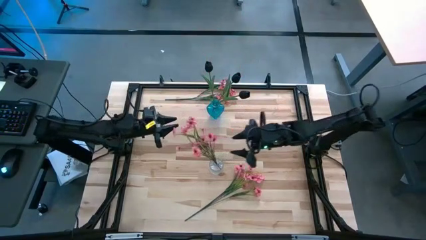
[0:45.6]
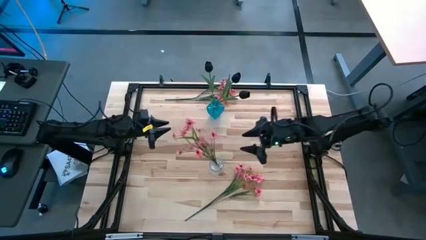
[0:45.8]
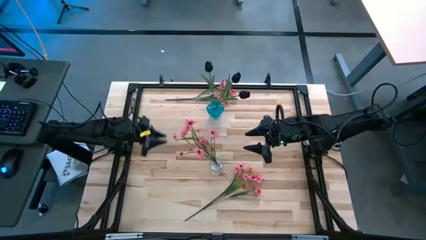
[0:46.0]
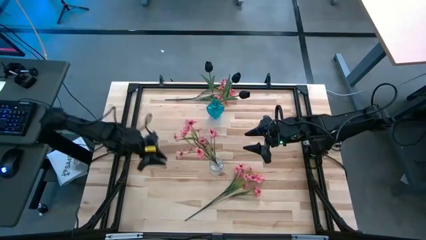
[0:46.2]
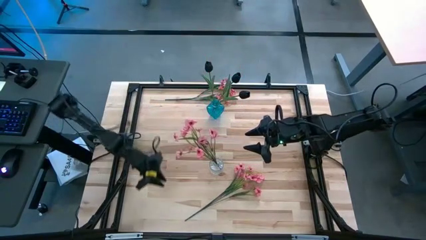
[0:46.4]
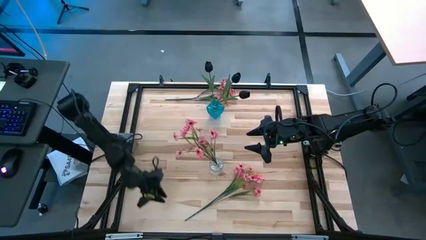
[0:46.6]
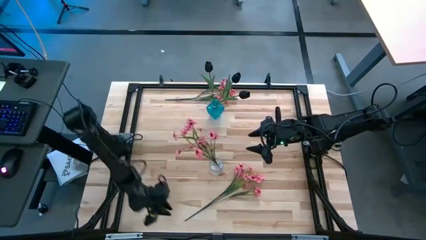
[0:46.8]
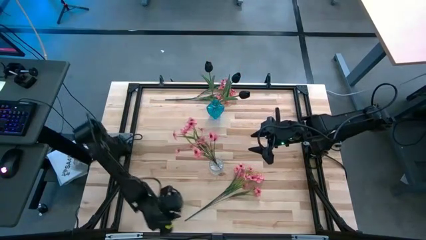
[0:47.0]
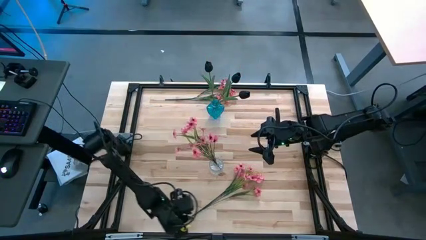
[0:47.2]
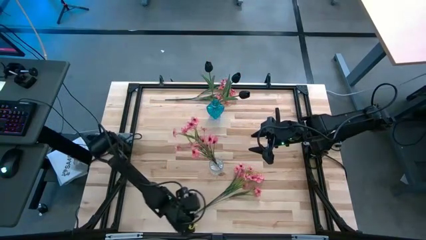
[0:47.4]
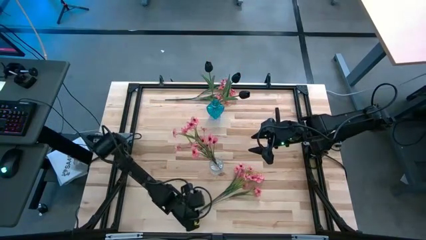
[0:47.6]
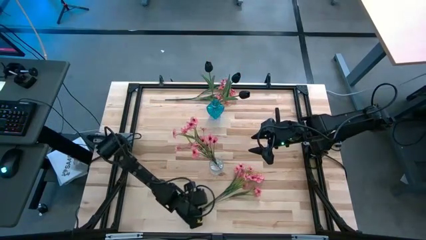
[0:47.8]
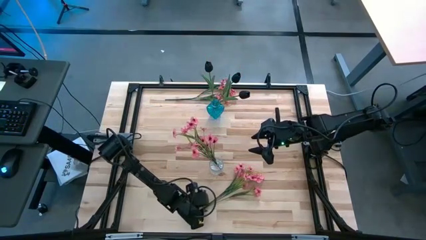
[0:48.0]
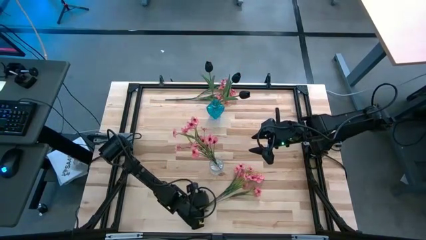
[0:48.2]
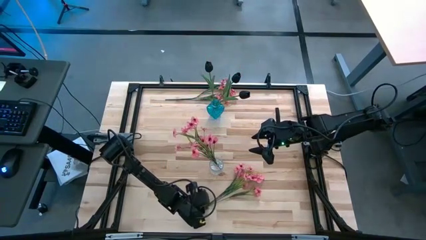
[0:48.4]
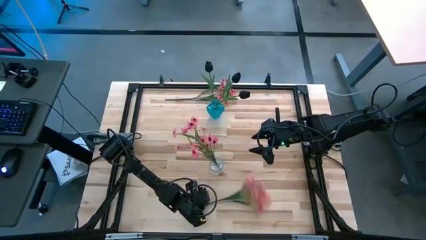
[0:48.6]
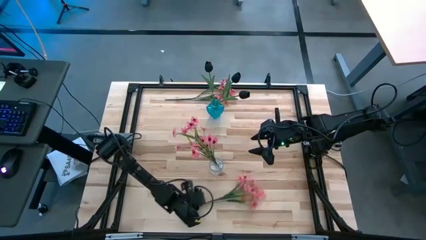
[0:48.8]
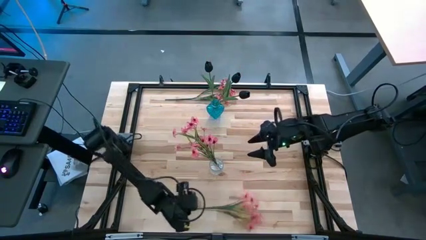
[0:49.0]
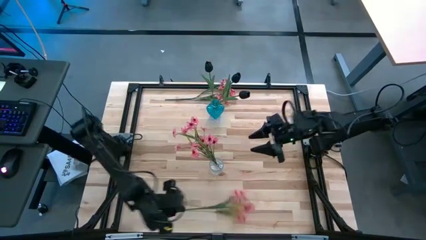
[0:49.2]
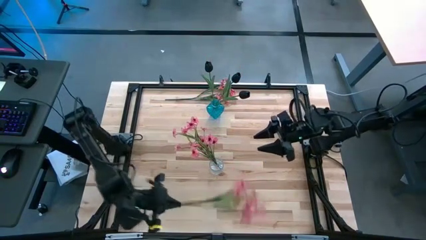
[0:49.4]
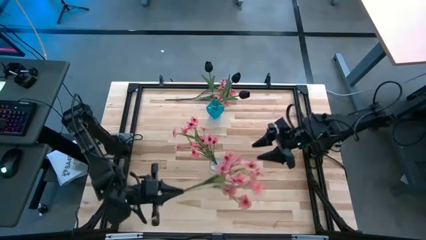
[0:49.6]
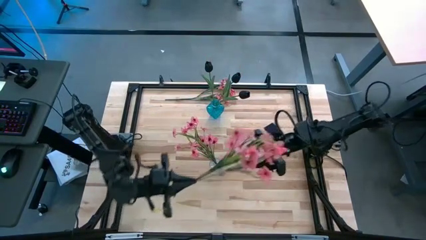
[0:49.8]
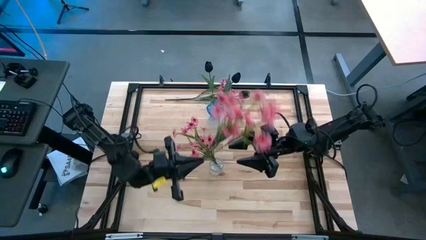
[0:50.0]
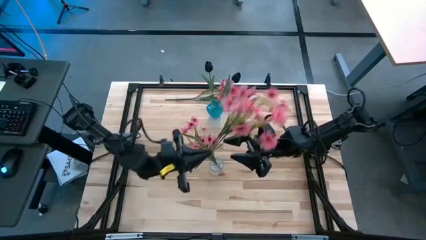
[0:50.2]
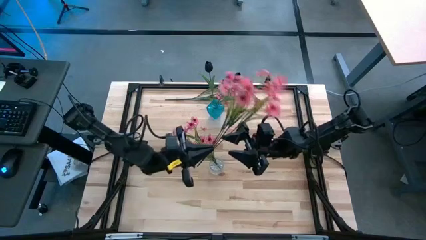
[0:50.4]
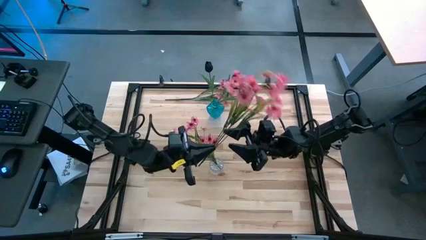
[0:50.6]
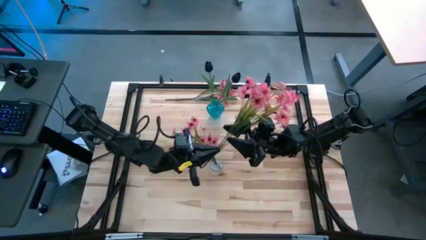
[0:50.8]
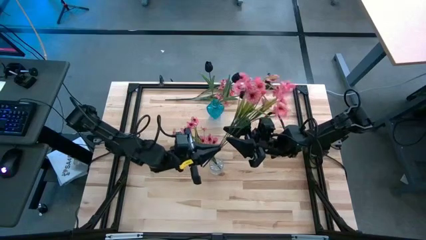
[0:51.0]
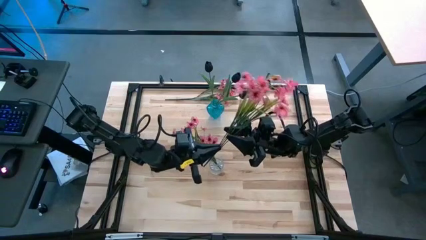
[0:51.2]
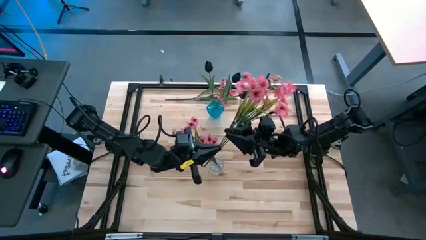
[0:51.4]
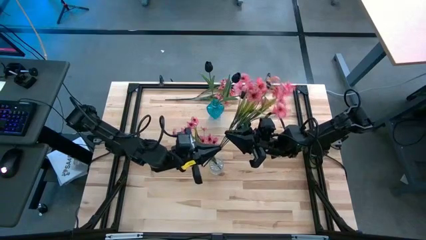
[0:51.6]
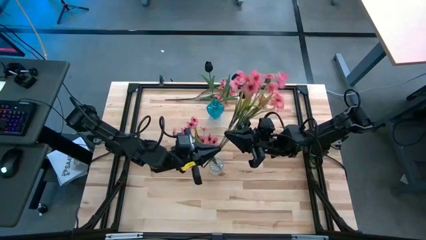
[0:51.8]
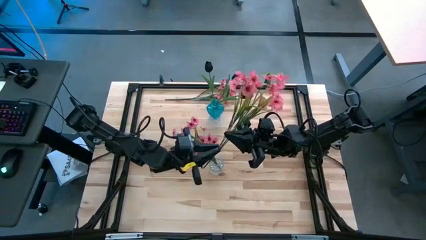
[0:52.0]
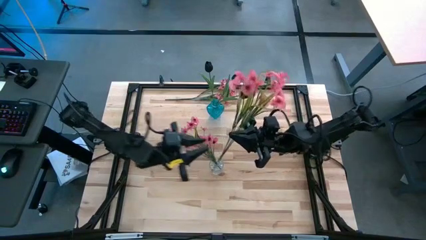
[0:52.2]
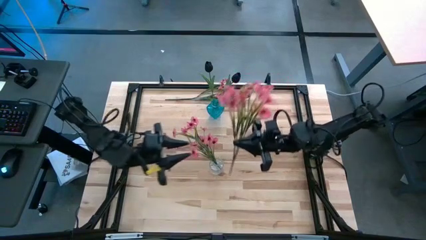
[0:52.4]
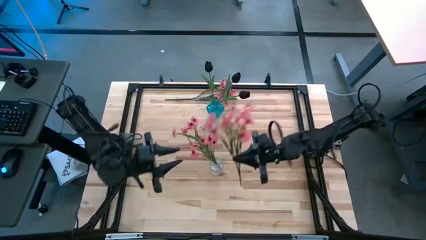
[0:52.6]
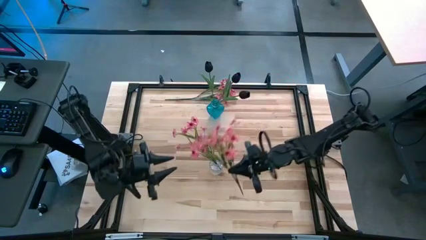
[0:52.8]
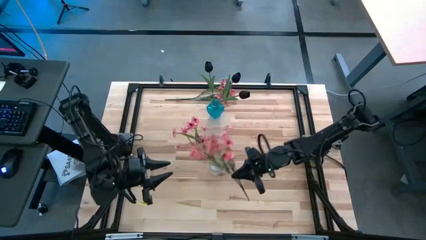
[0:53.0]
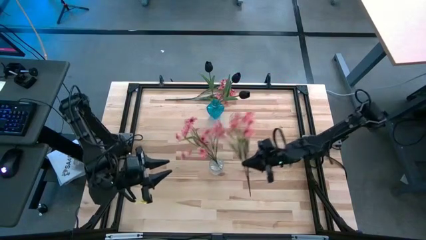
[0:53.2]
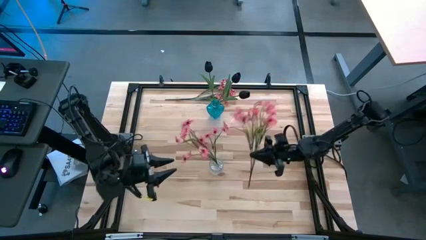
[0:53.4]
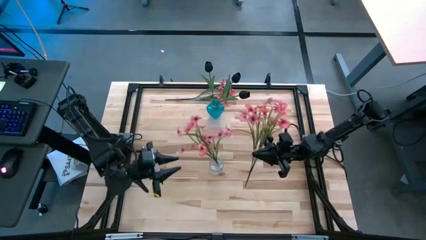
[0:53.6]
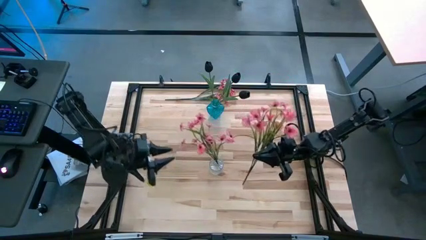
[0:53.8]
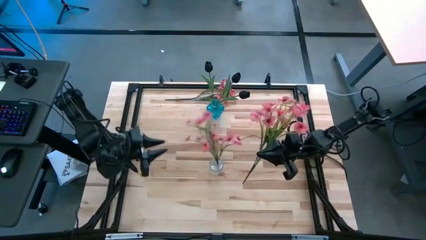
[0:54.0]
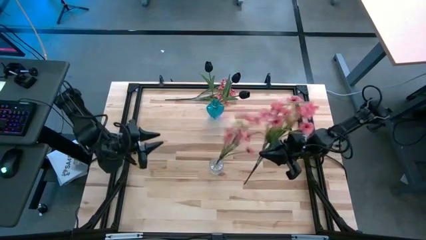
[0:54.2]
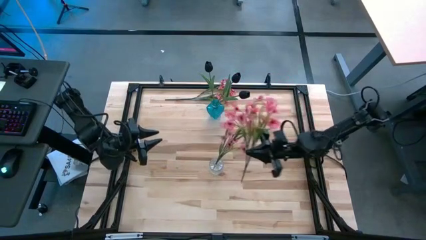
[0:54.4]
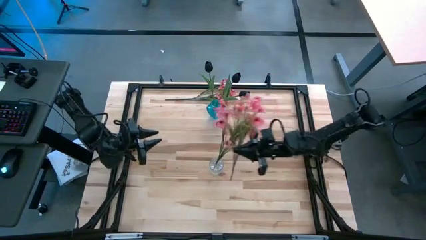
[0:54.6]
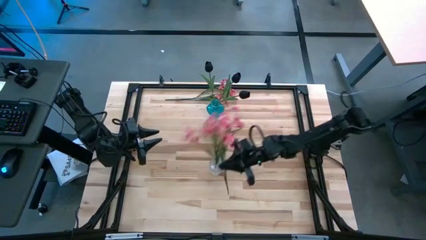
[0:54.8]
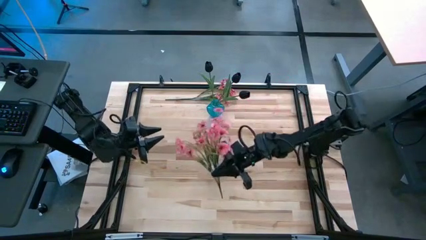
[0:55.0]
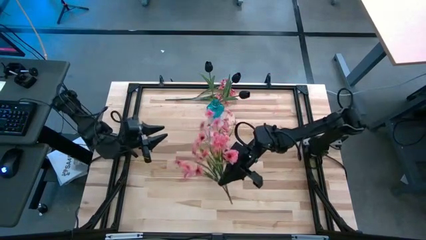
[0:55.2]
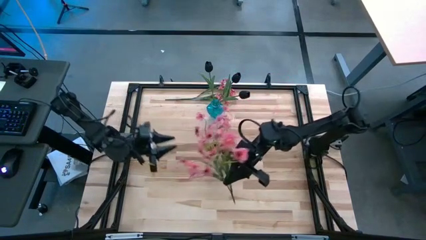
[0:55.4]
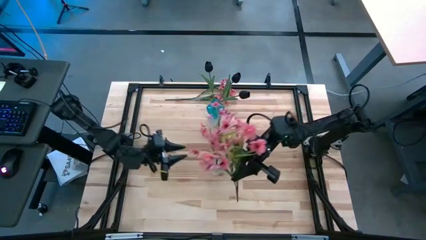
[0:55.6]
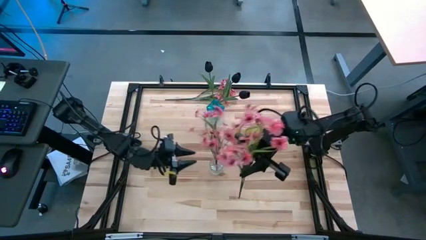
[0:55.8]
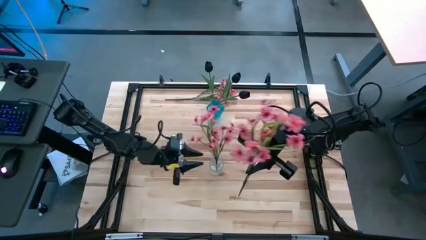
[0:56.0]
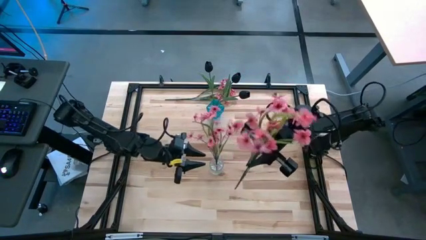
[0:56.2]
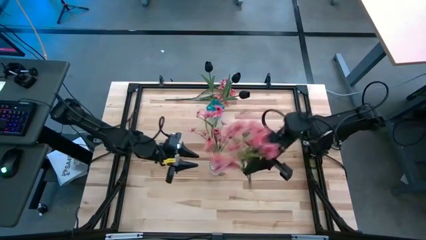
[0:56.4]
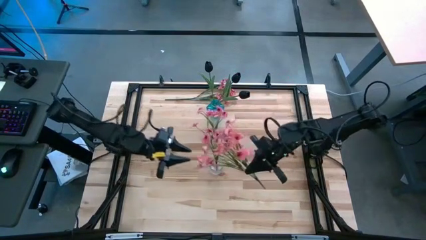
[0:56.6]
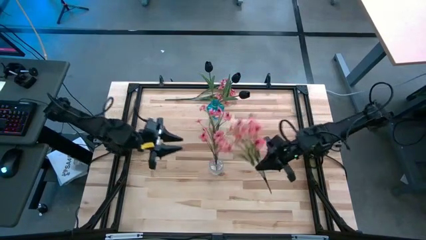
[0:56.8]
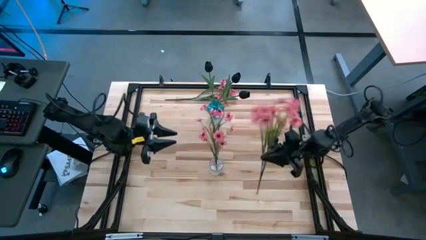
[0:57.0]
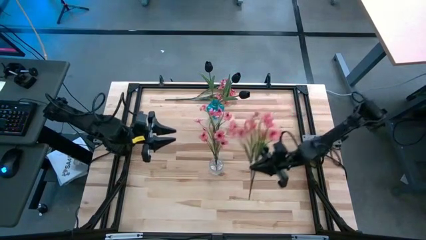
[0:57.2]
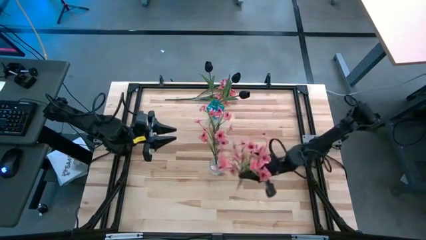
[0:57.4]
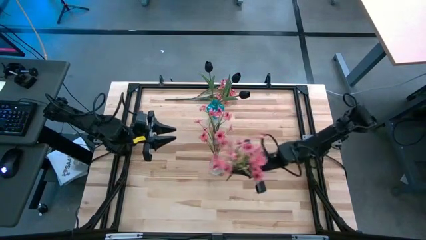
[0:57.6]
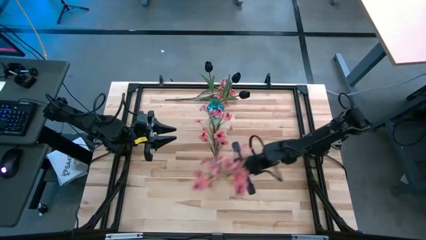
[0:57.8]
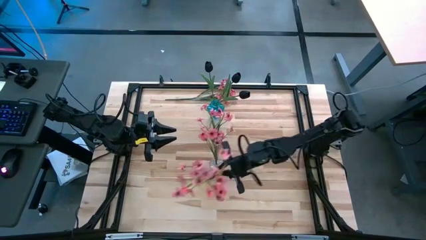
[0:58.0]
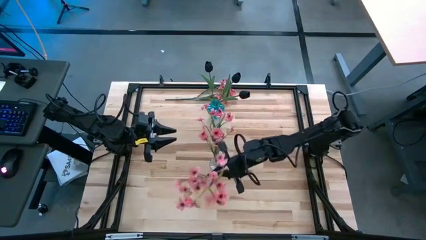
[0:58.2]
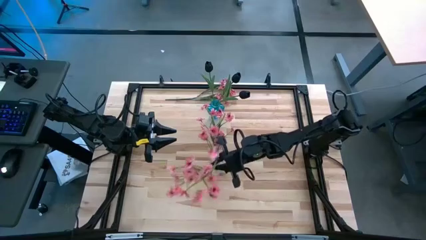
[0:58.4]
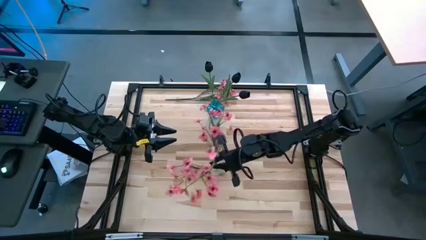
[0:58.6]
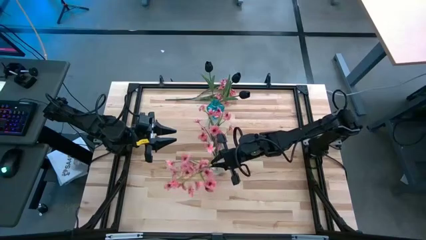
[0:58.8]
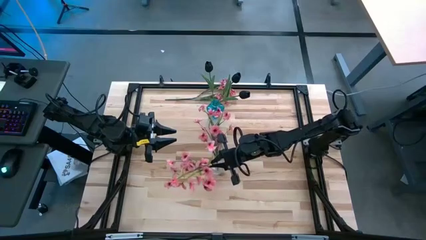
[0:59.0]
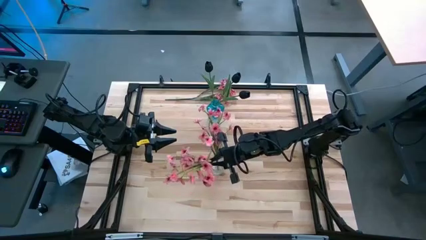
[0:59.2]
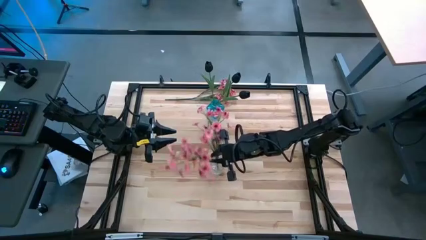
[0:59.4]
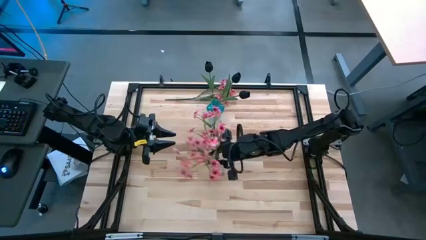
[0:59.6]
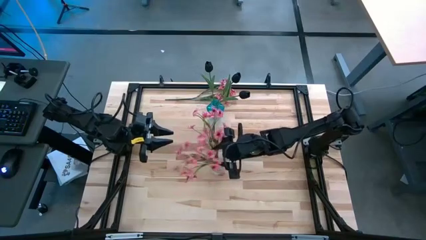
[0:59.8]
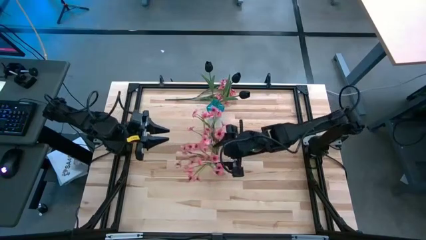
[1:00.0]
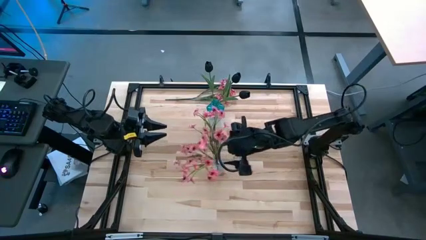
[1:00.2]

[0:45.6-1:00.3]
Task: Sort flowers into vase by color
Put the bottom pink flower into the transparent vase
